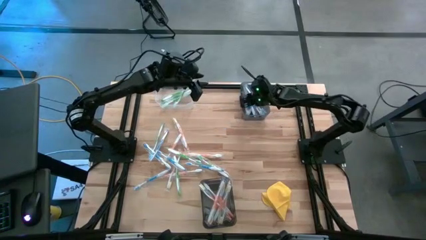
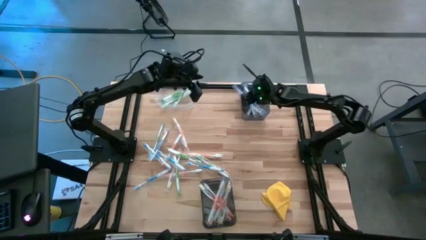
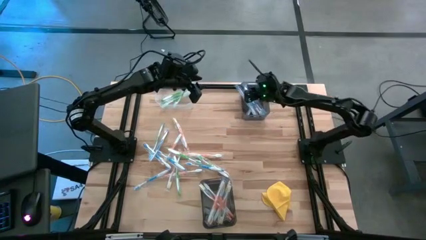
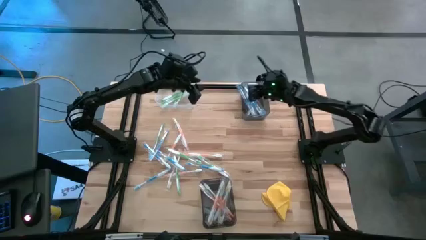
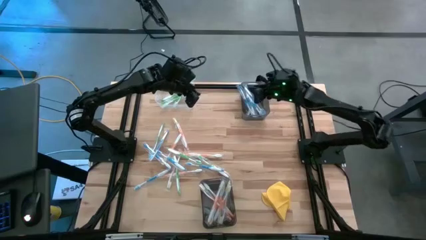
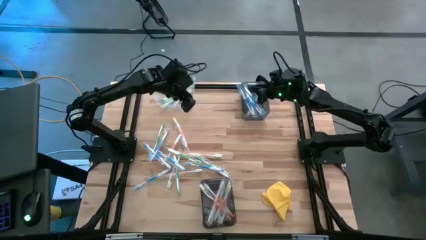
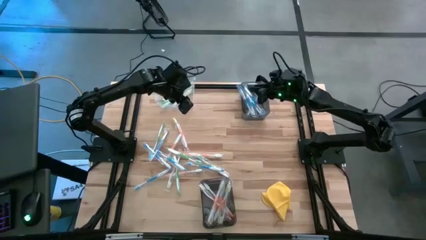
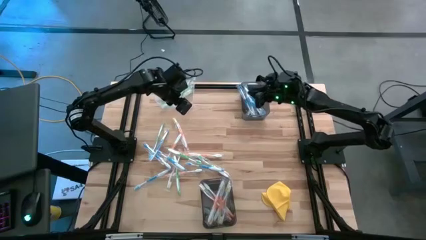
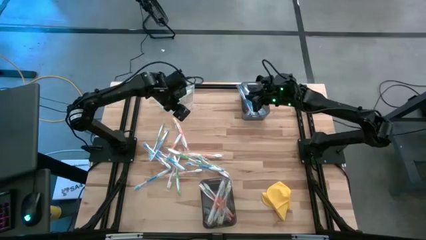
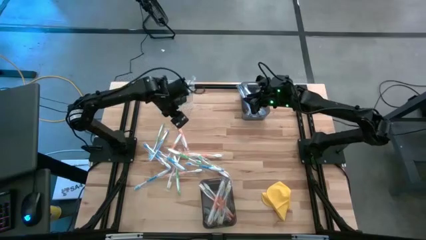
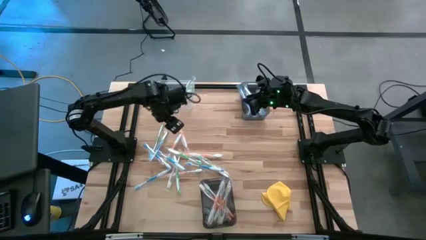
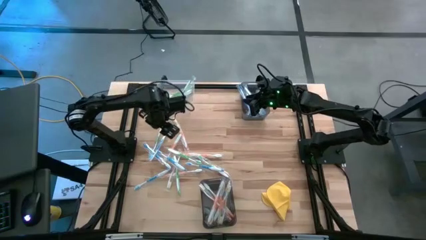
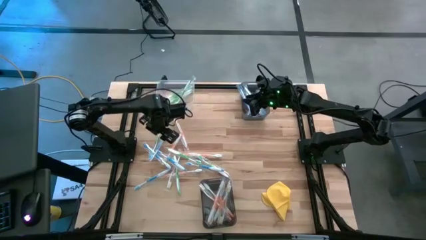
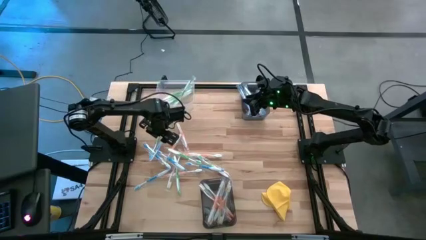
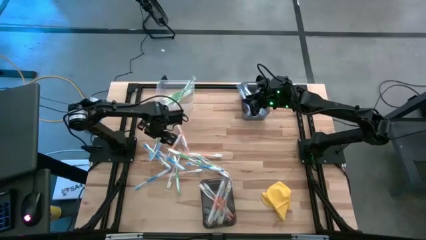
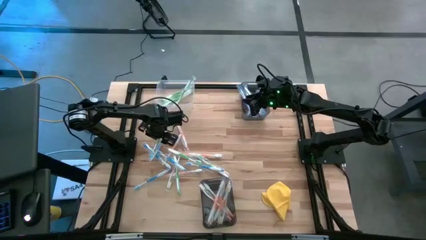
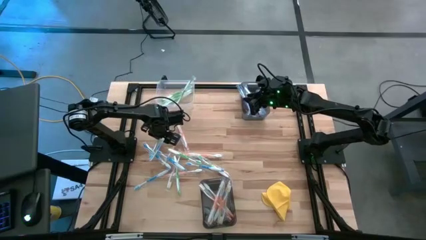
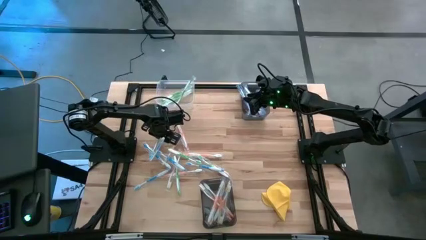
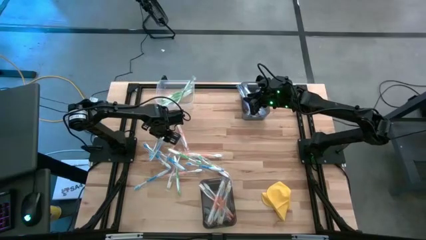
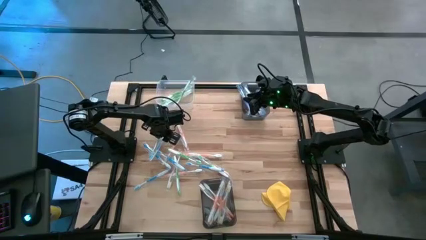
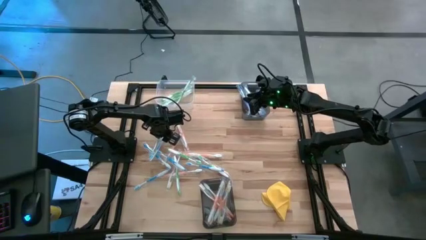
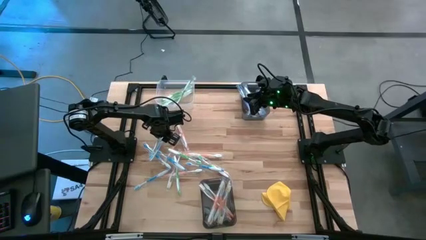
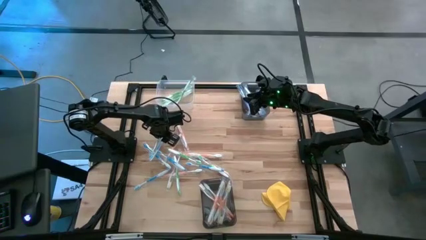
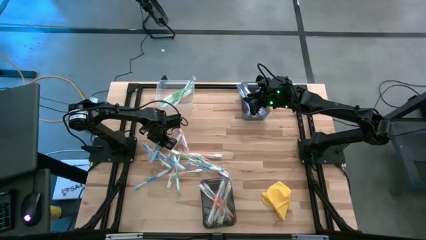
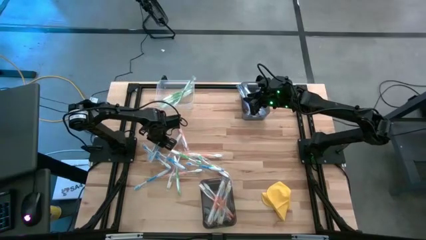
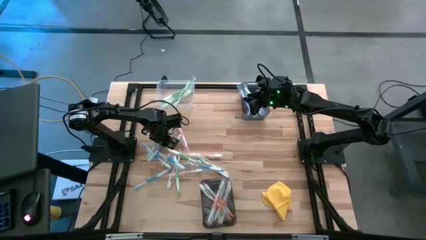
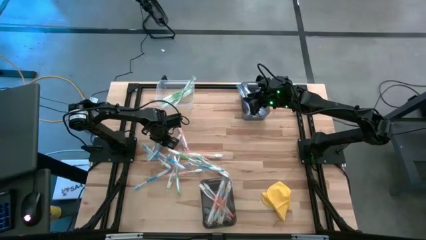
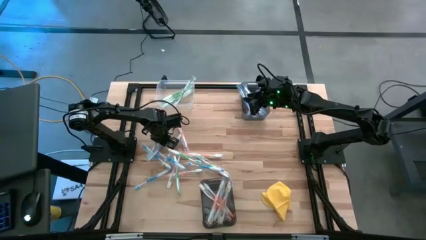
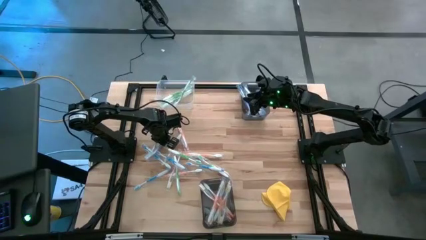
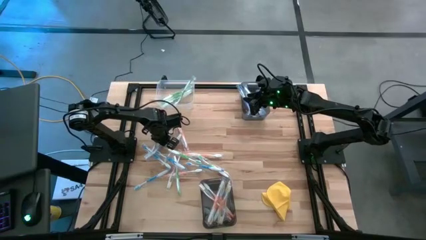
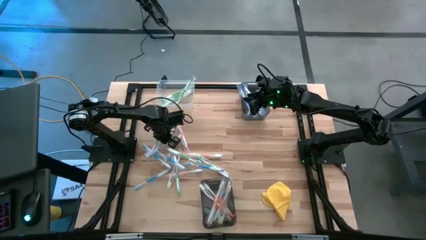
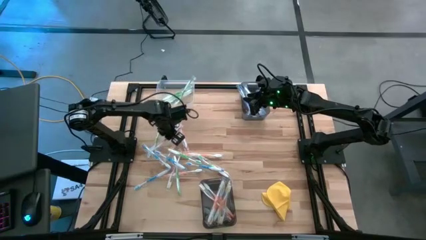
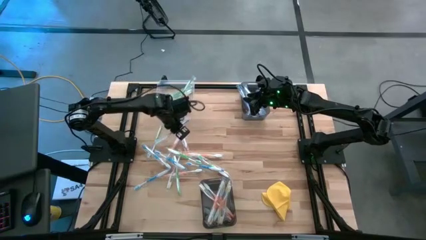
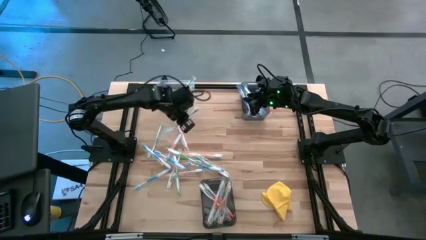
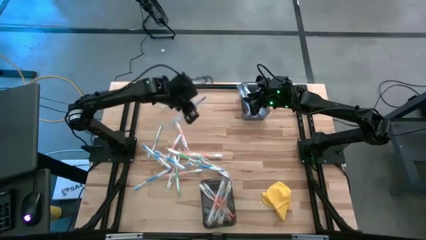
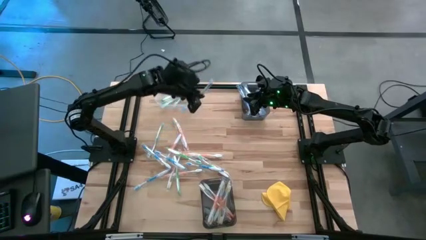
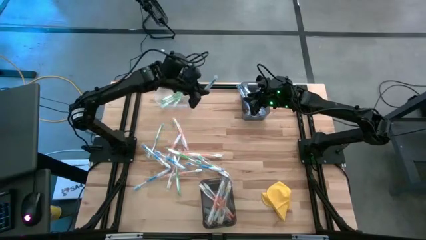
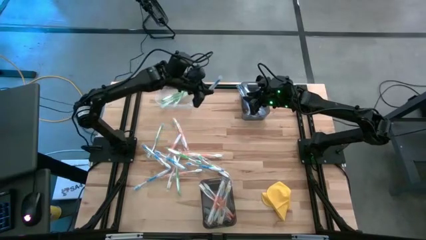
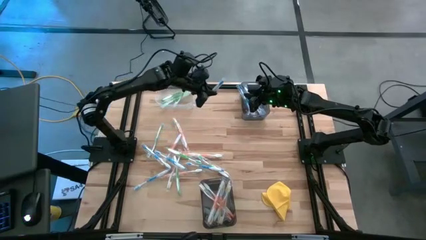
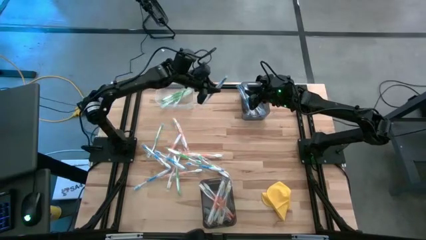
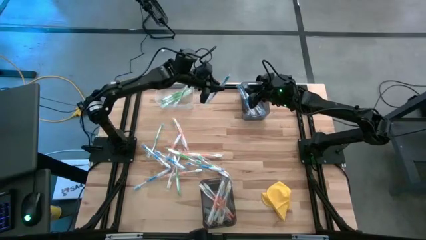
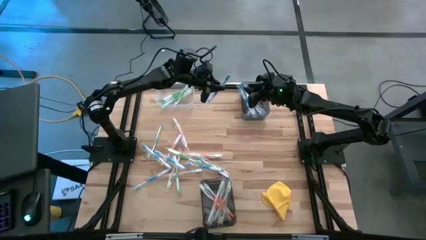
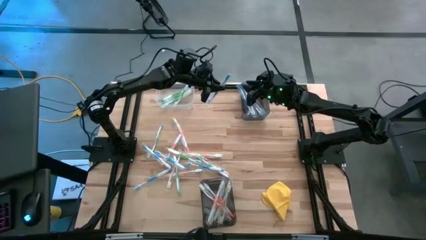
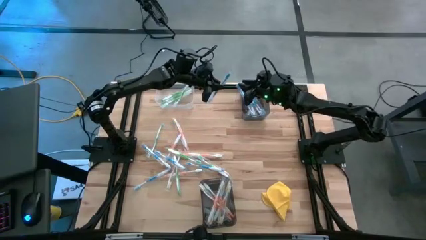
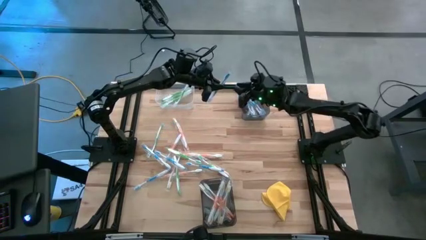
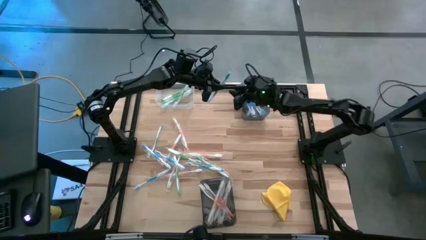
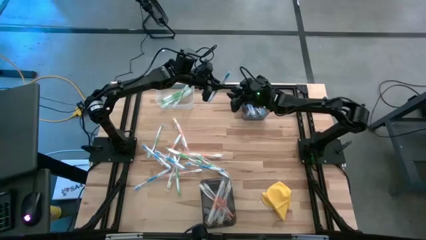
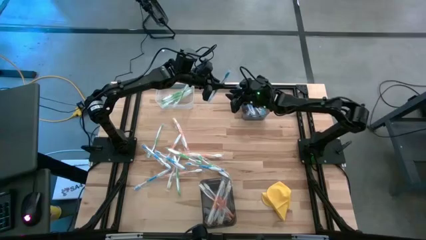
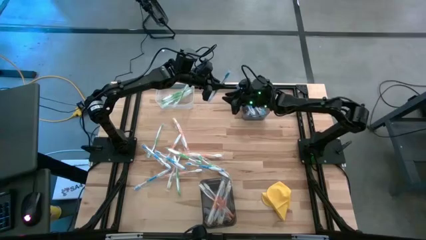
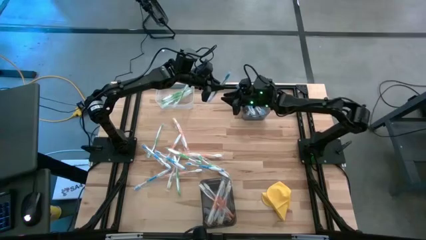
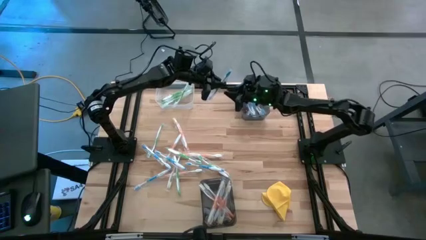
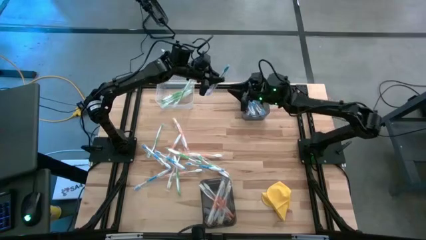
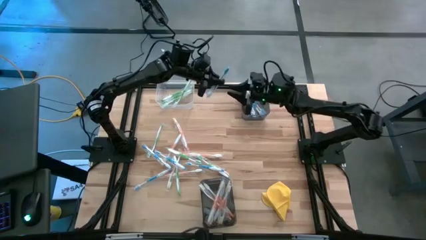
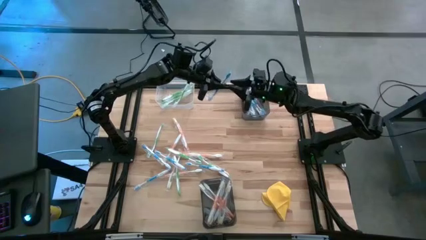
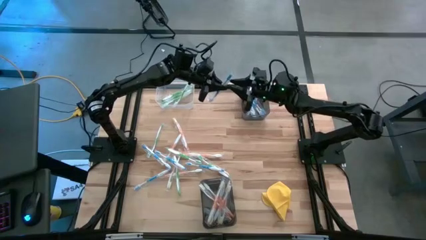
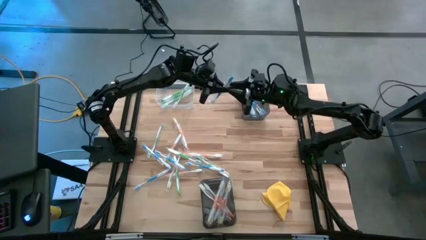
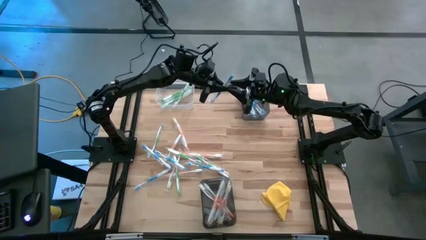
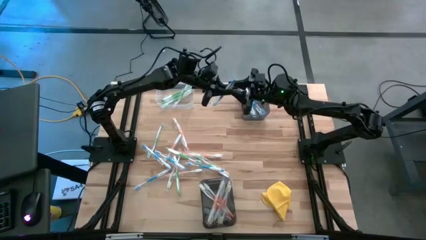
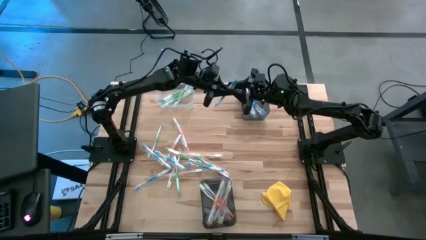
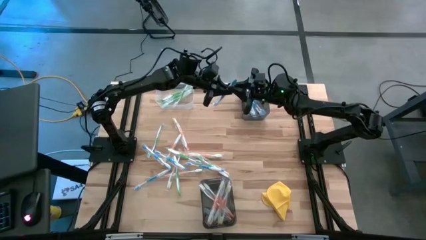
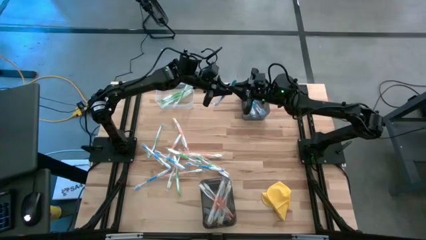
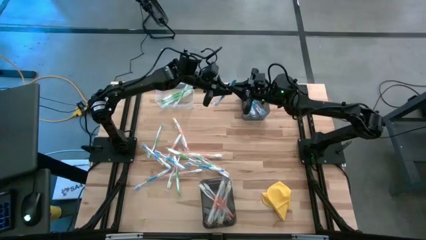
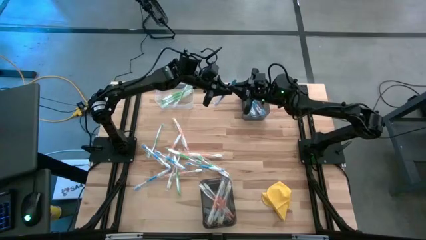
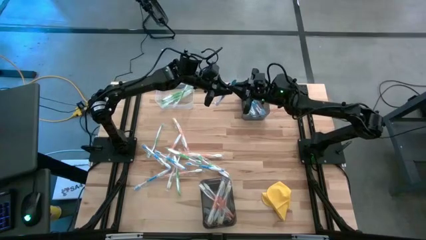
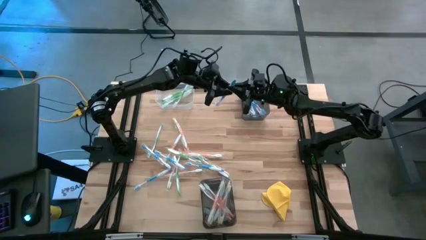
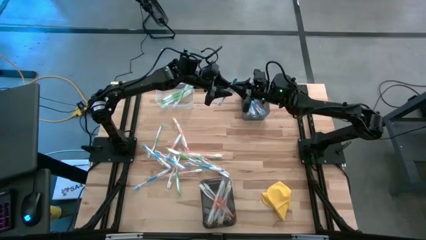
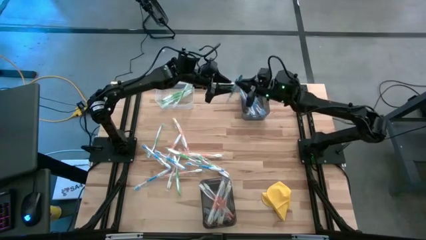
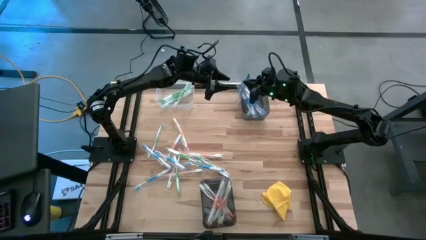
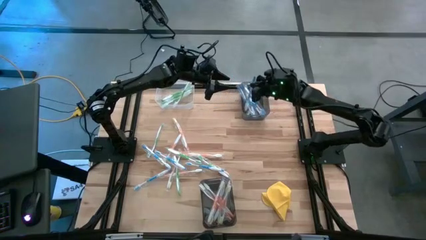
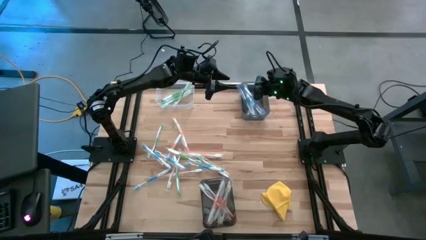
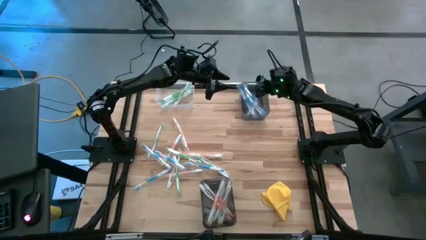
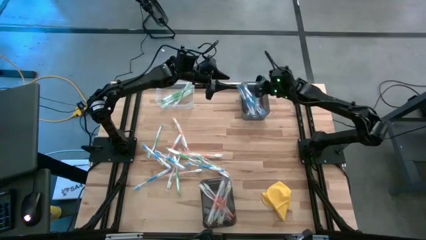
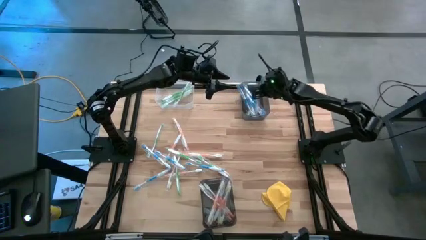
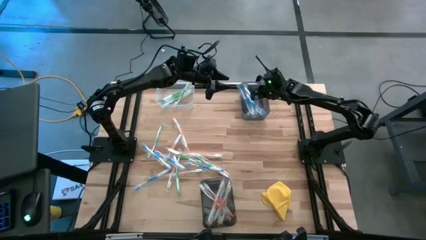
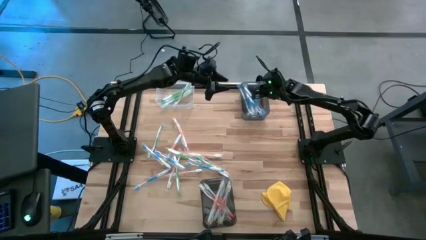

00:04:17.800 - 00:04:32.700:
Task: Pick & Place Toothbrushes
Put the blue toothbrush into the top black bin

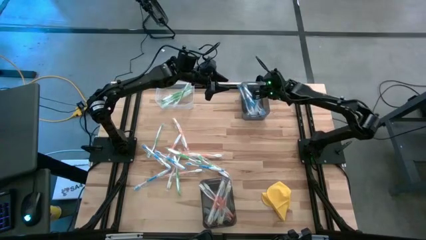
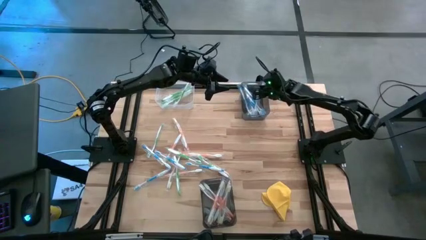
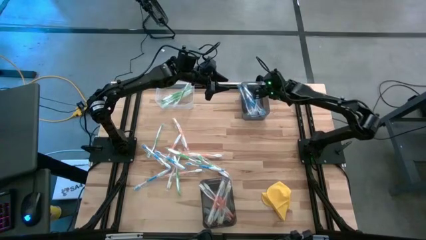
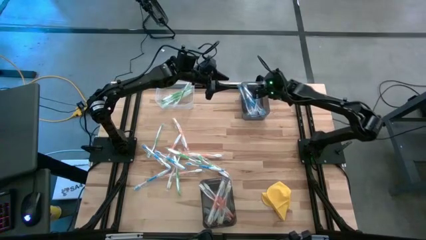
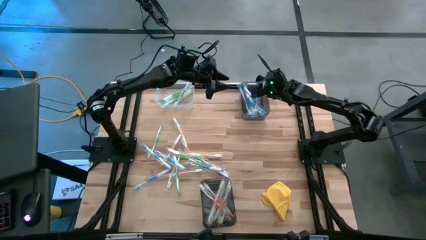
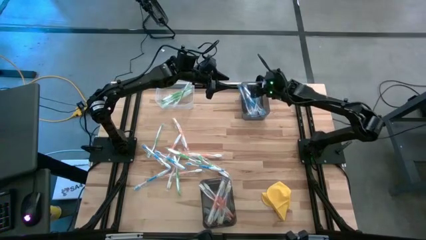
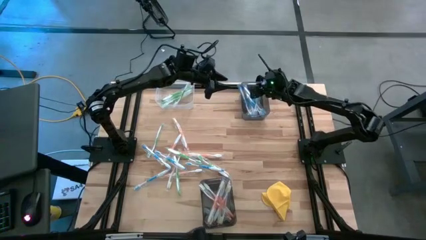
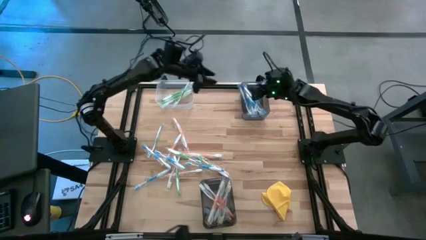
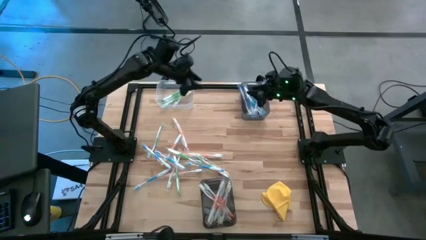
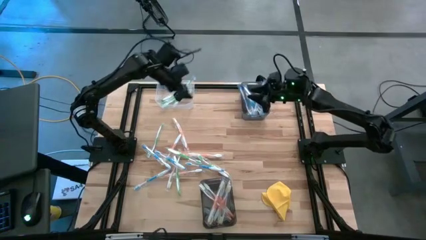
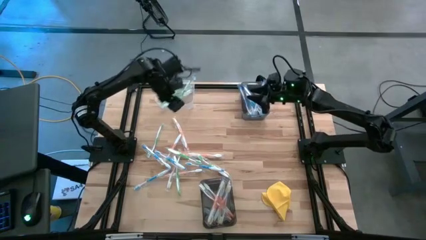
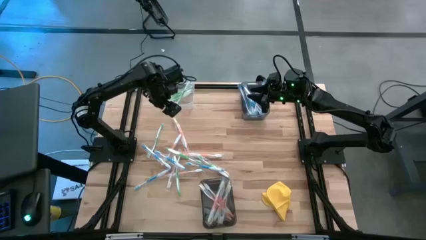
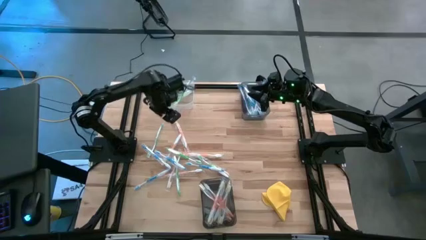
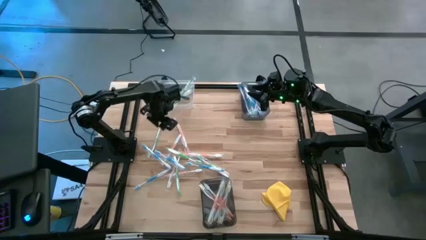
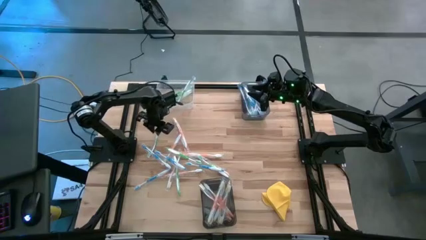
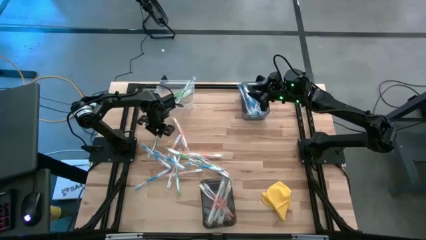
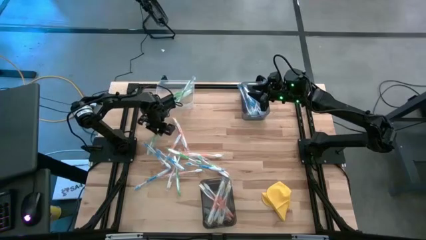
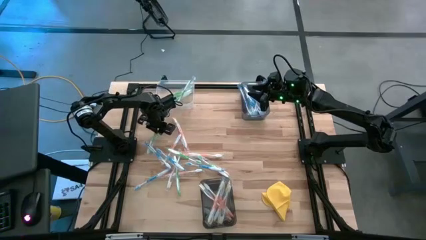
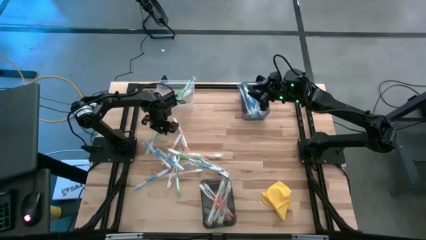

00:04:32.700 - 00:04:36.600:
Put the green toothbrush into the transparent bin
